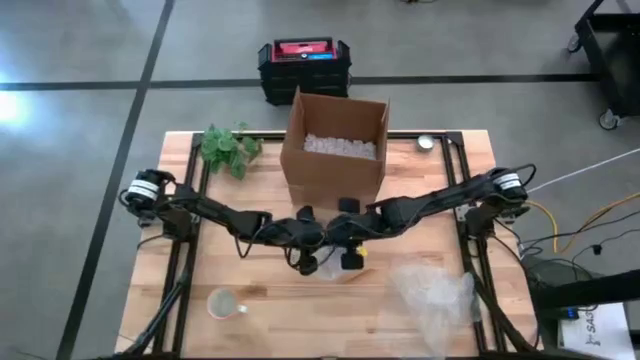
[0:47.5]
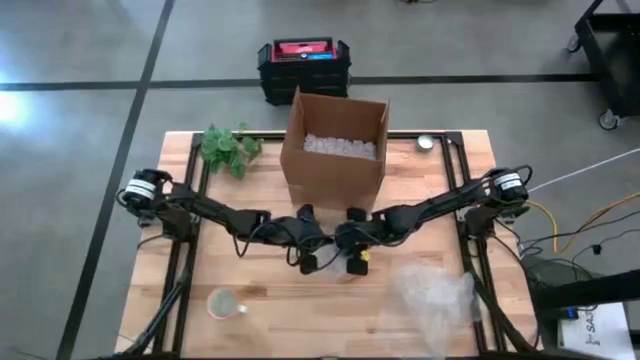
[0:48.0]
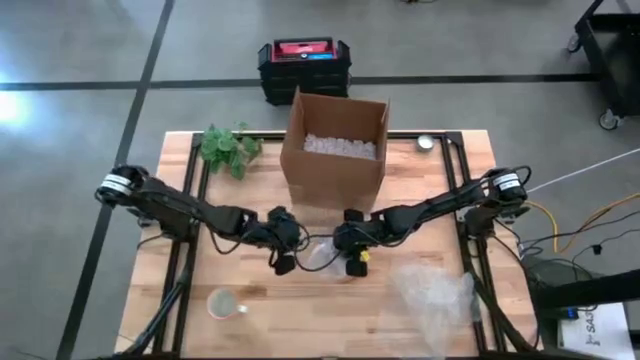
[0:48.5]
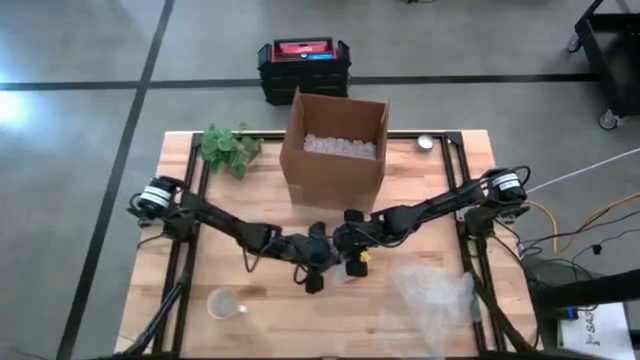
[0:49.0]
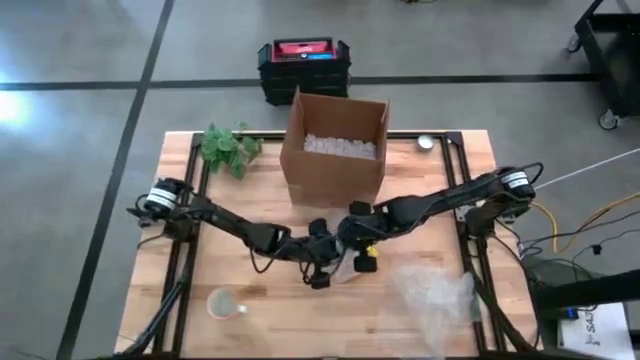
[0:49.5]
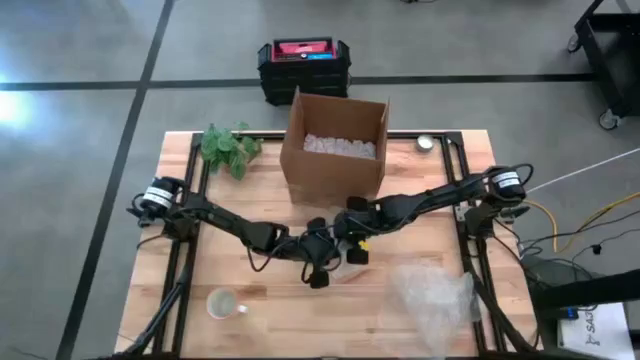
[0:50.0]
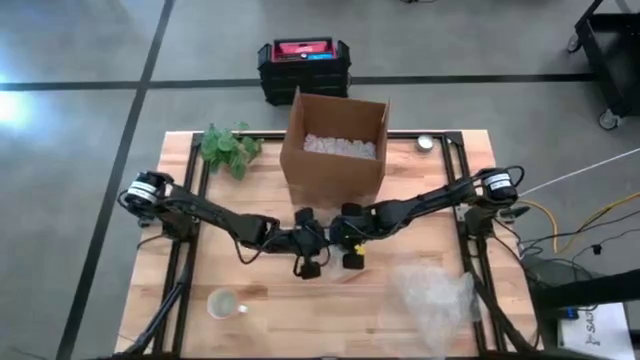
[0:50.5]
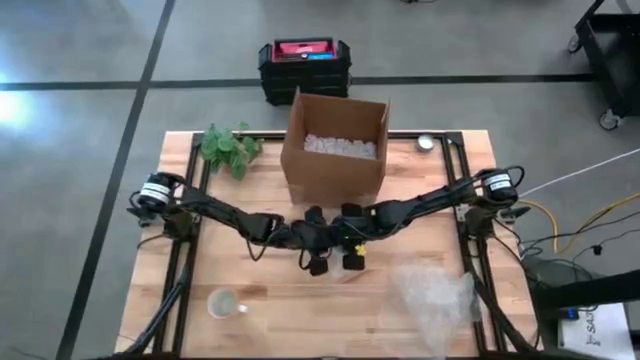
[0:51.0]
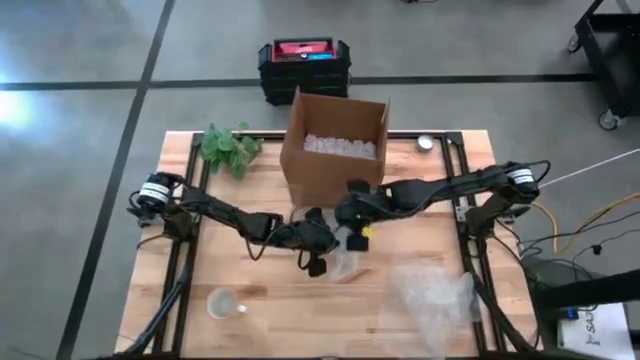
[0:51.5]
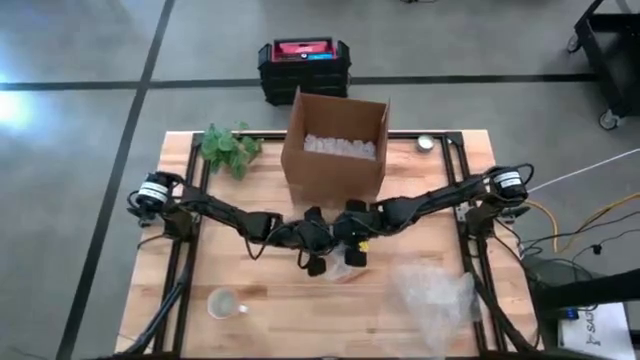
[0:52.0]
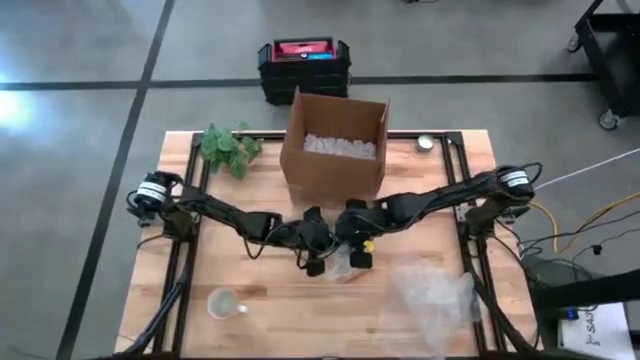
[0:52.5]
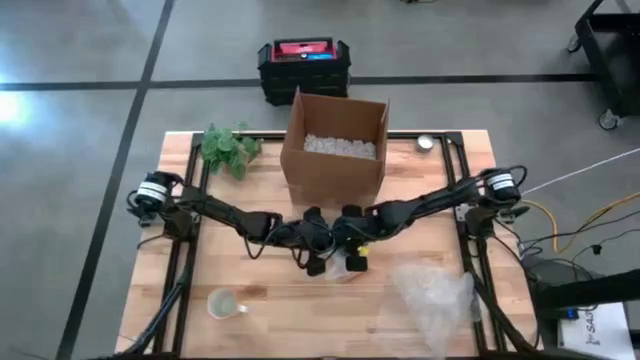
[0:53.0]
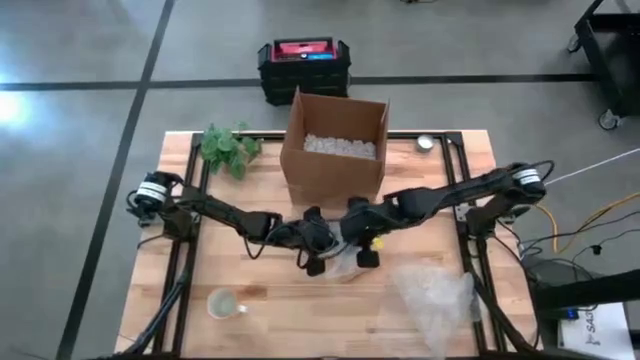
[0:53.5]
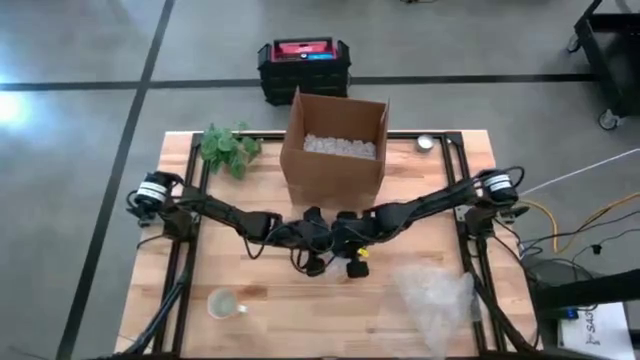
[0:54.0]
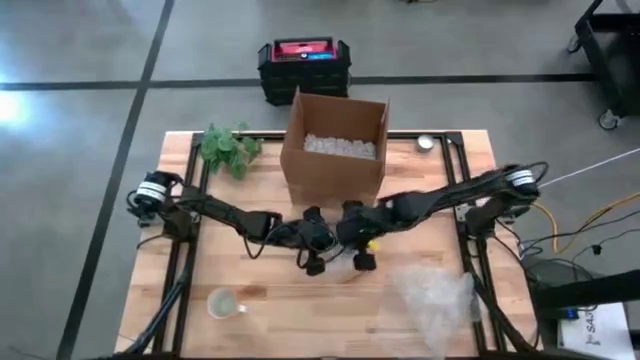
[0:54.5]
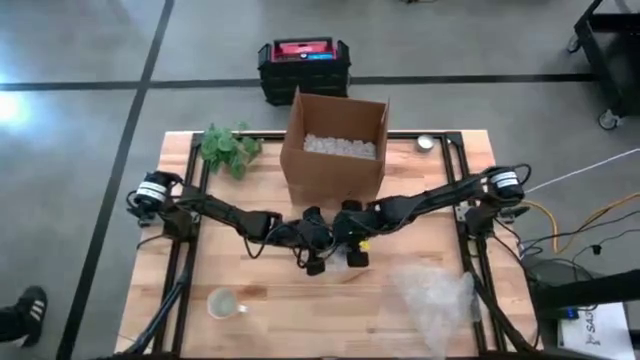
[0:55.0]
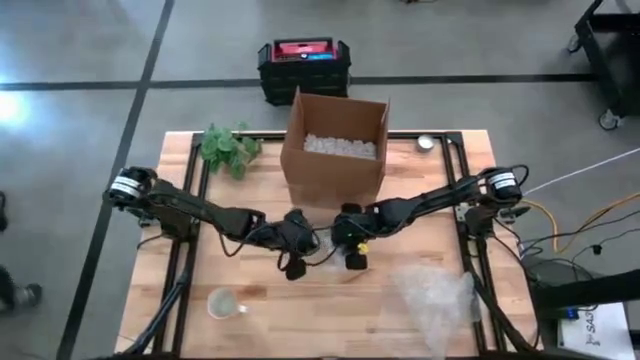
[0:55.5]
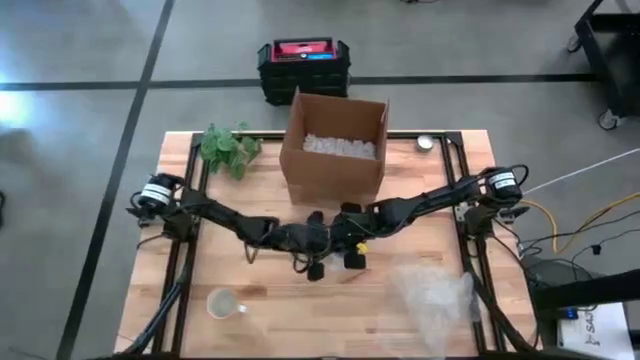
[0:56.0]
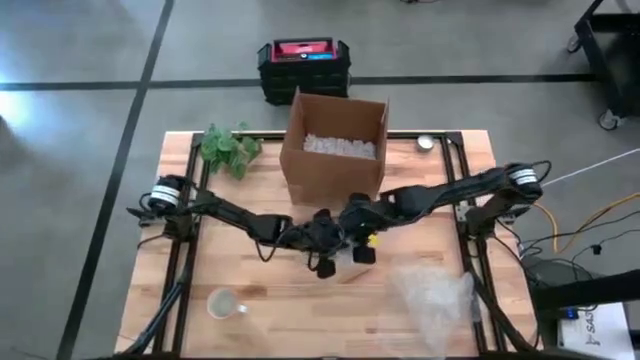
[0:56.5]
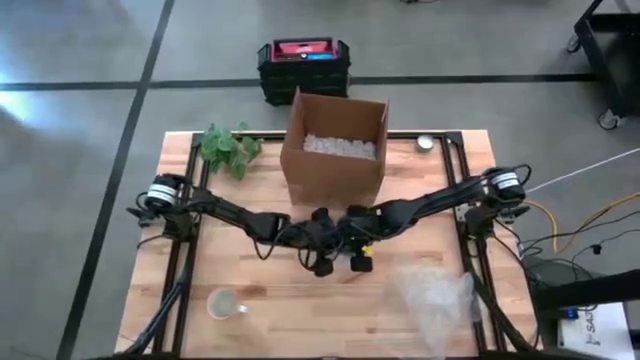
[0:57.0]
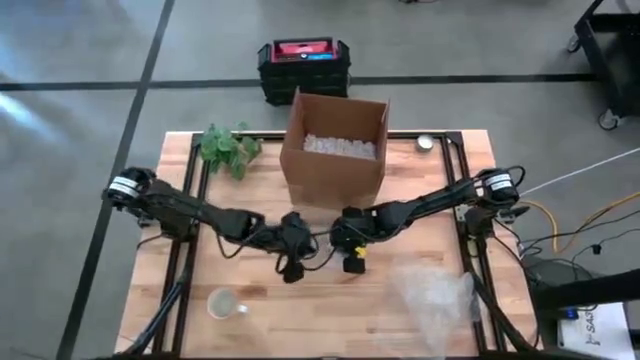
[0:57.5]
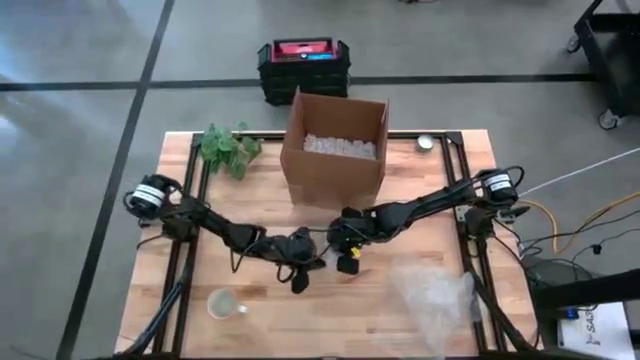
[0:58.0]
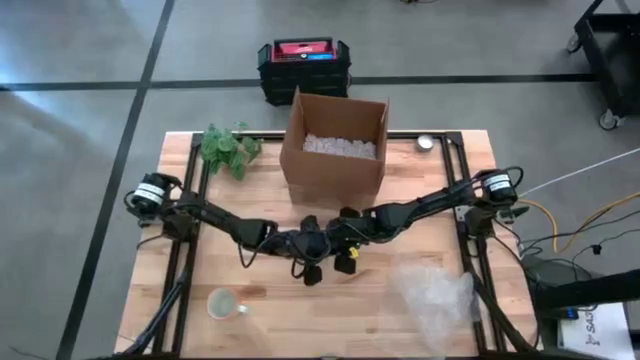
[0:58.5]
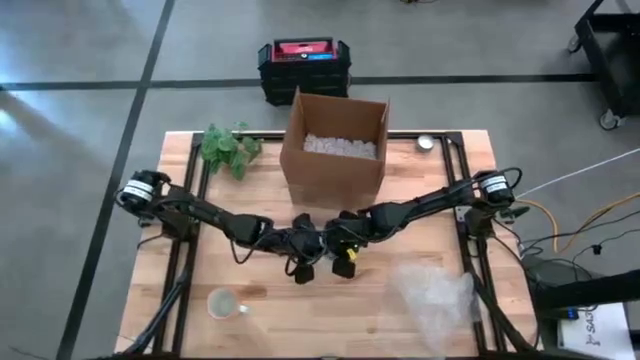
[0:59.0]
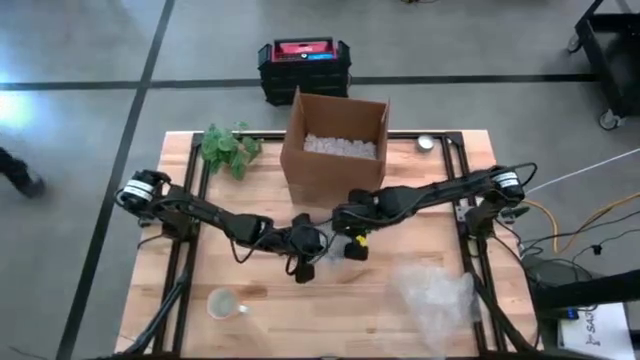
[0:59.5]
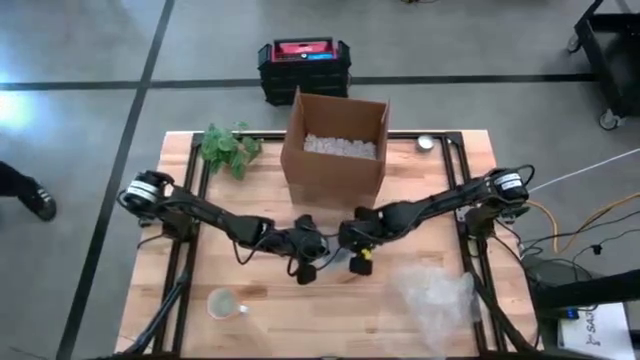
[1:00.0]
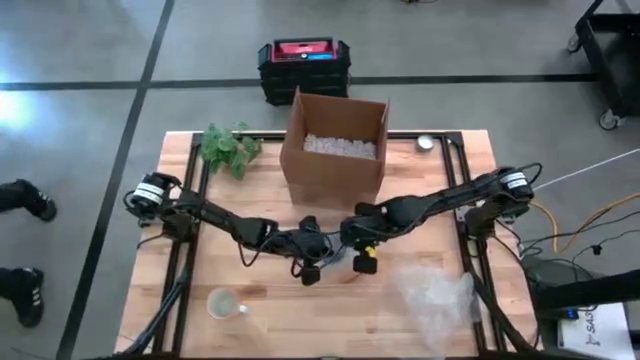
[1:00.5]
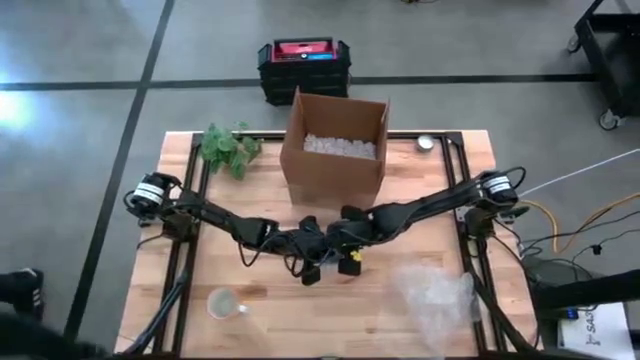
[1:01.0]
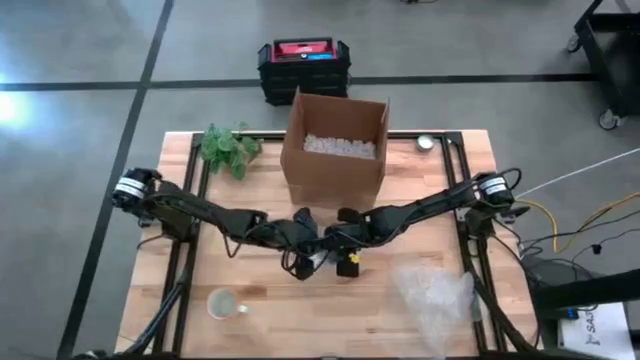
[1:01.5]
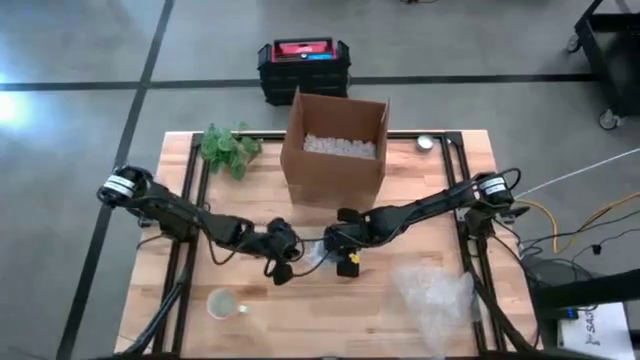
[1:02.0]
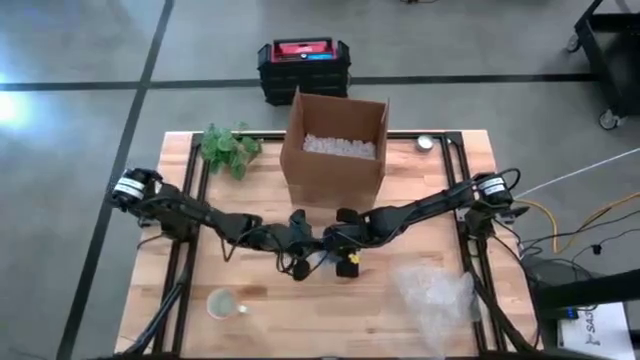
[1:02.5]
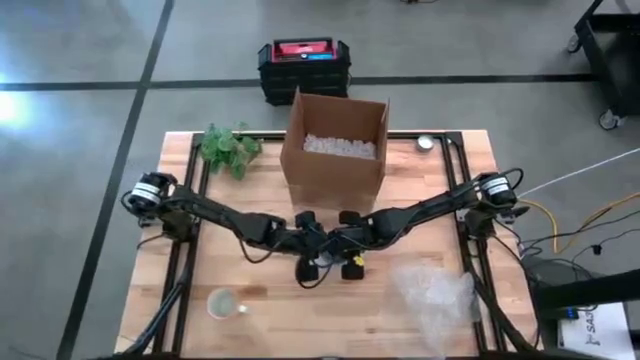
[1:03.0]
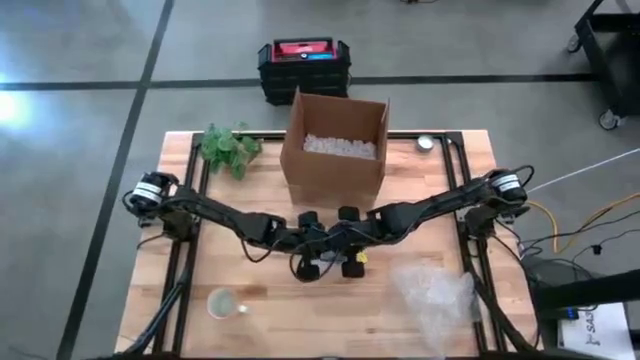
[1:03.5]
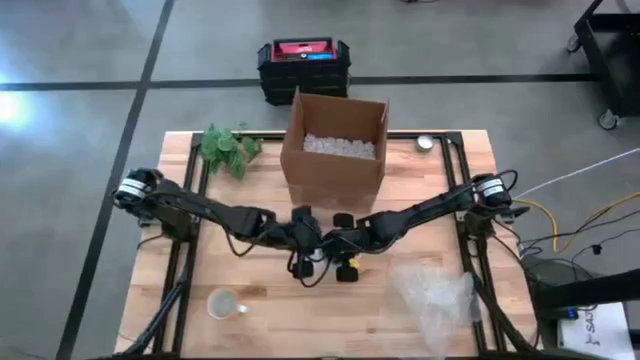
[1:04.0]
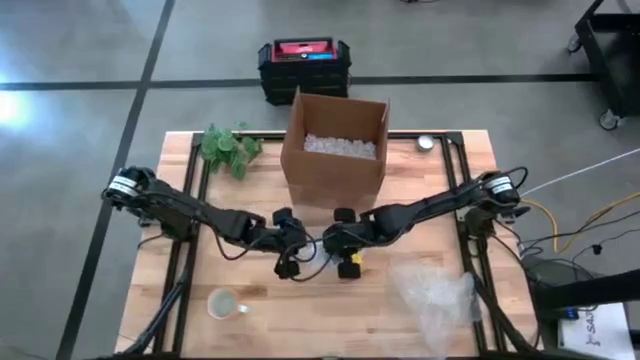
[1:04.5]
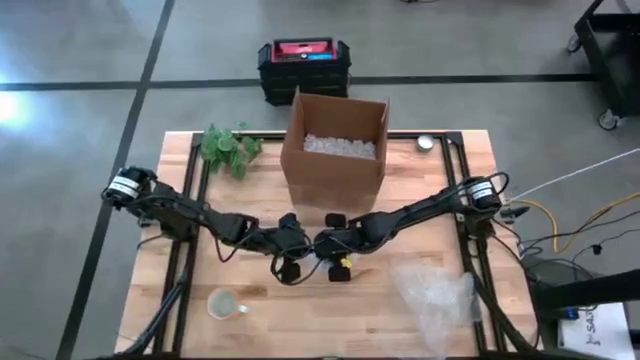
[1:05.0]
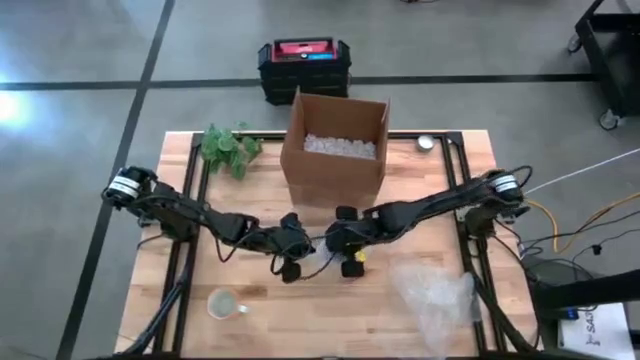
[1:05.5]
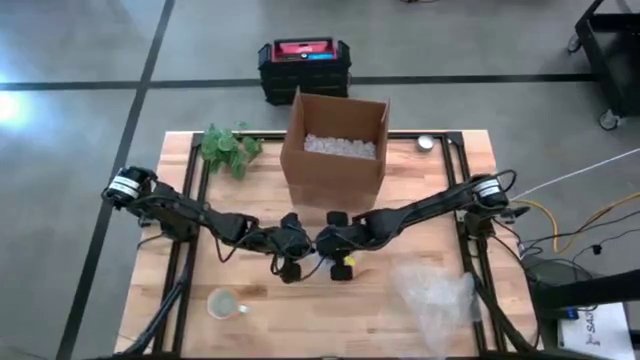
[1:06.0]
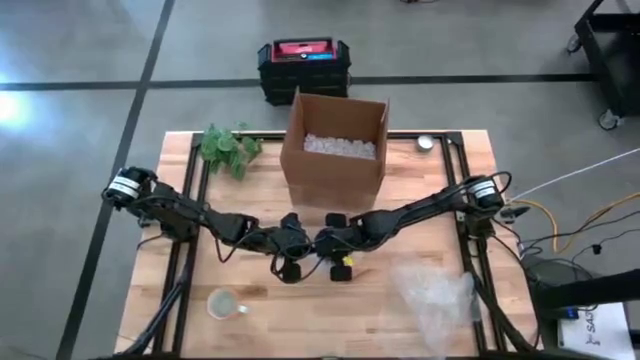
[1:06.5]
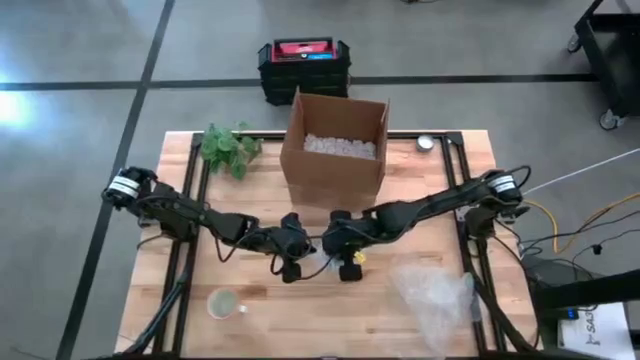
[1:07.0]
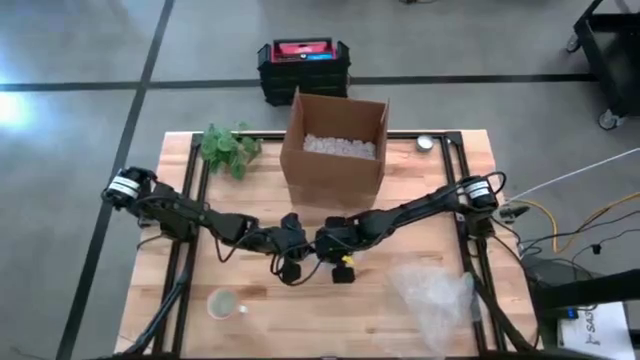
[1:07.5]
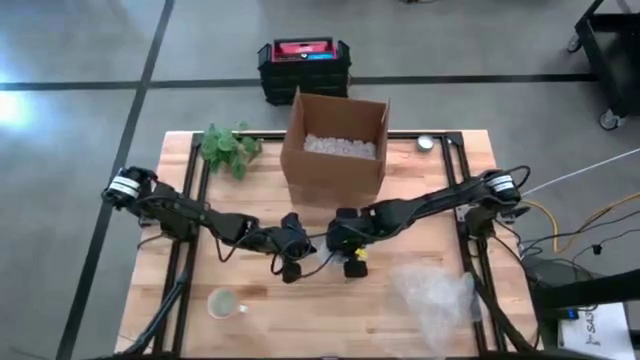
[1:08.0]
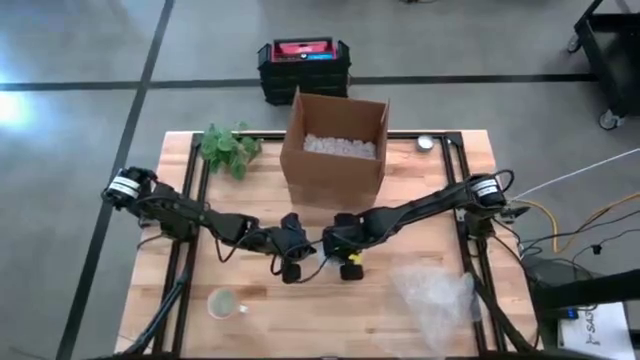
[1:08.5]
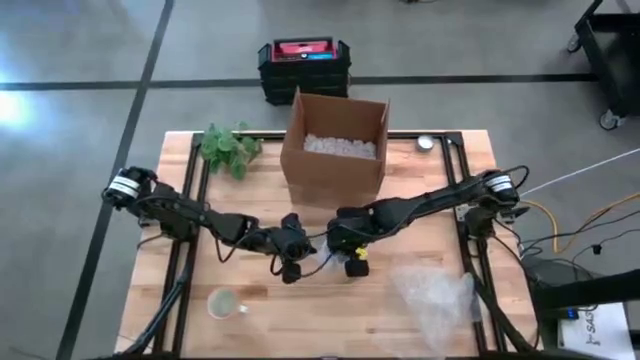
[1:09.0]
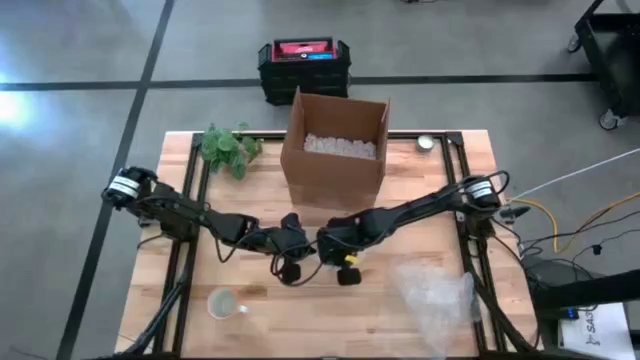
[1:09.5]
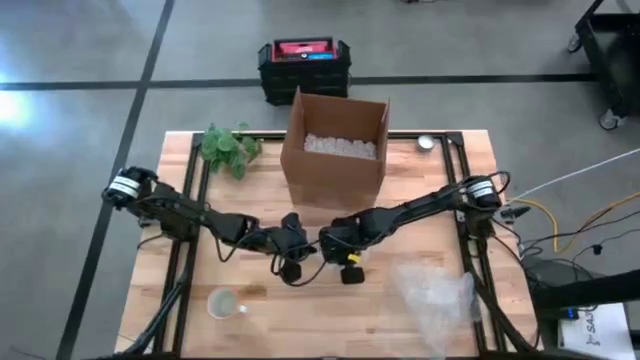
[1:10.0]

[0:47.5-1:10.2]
Task: wrap mug
Wrap the blue cup in bubble wrap
